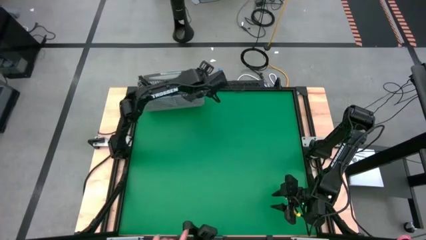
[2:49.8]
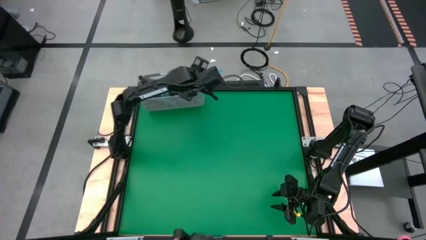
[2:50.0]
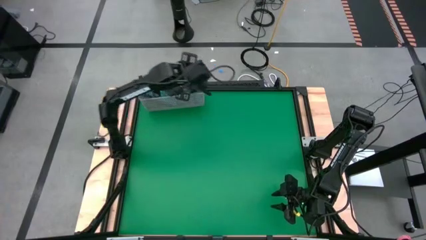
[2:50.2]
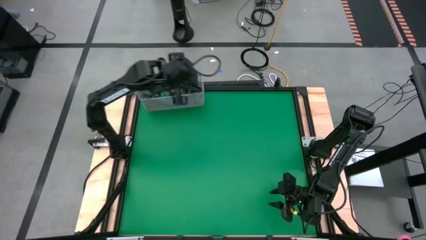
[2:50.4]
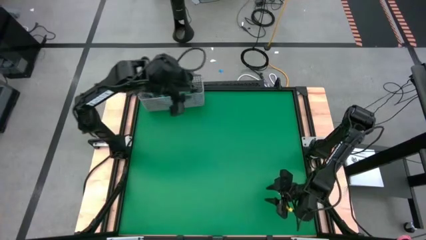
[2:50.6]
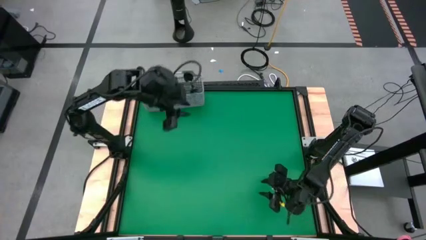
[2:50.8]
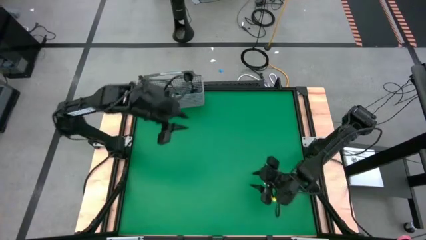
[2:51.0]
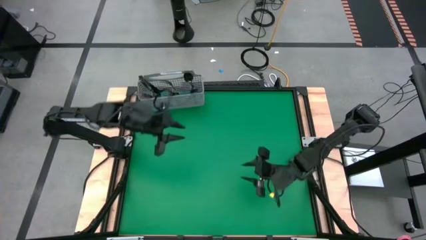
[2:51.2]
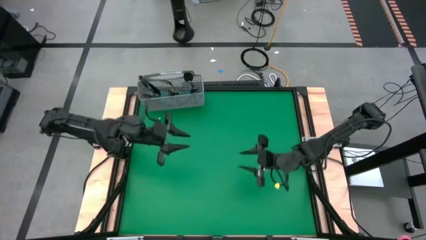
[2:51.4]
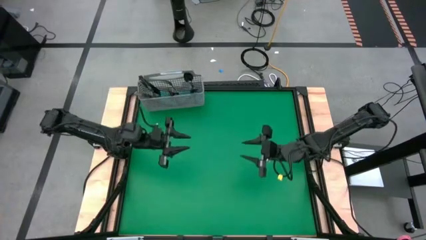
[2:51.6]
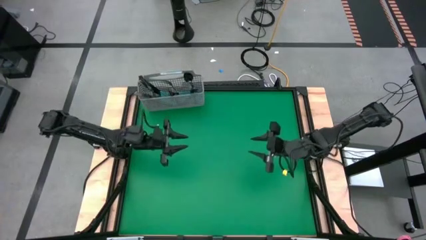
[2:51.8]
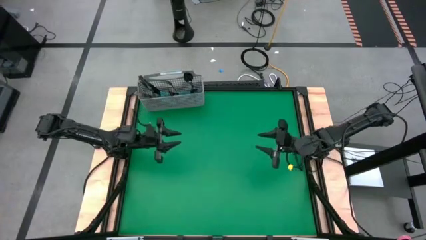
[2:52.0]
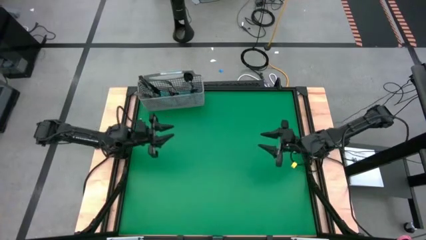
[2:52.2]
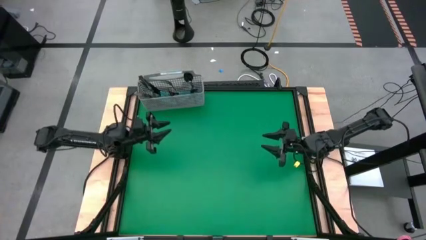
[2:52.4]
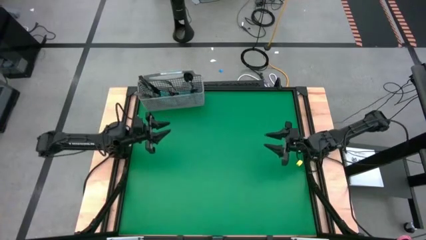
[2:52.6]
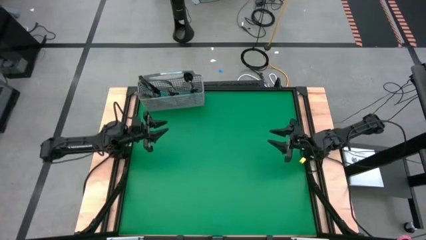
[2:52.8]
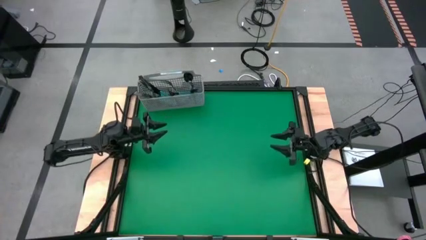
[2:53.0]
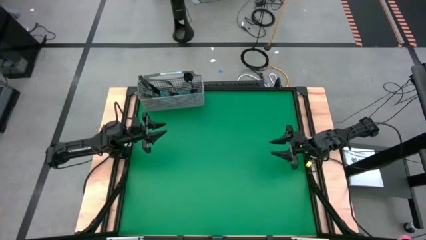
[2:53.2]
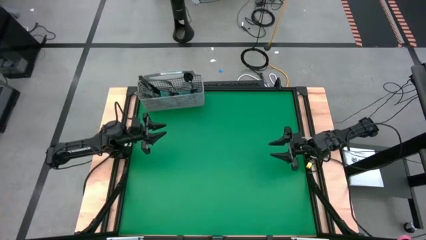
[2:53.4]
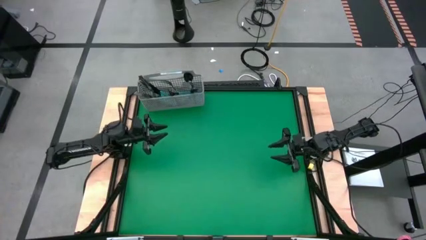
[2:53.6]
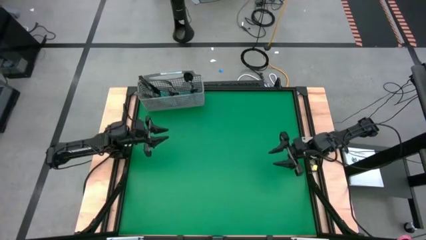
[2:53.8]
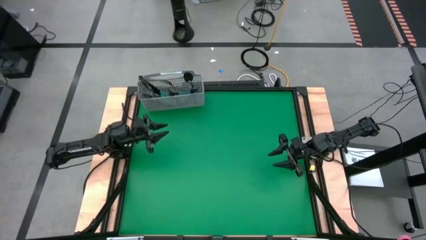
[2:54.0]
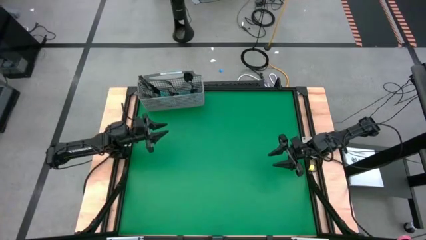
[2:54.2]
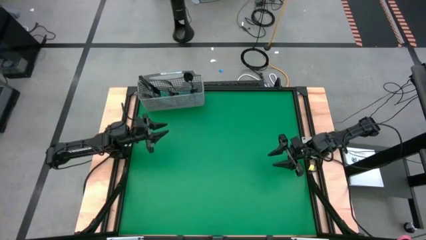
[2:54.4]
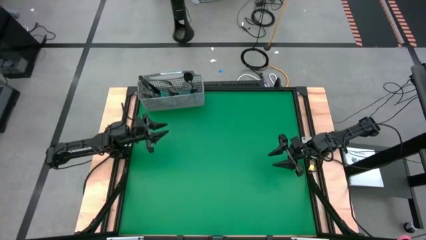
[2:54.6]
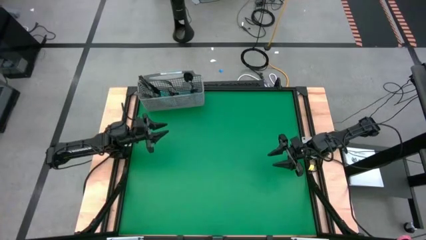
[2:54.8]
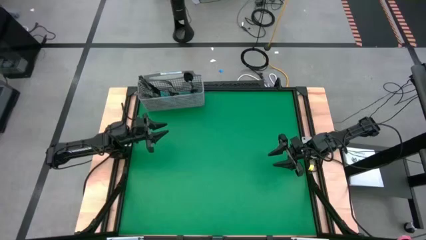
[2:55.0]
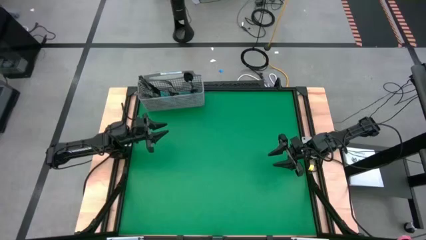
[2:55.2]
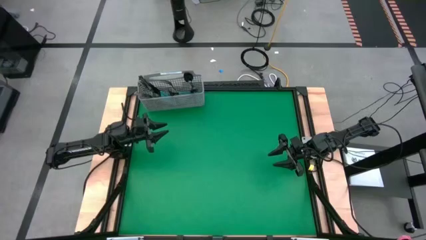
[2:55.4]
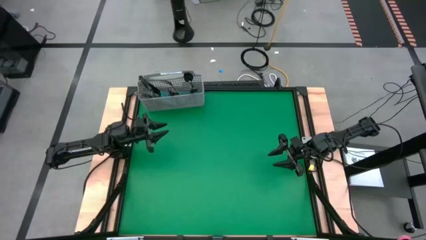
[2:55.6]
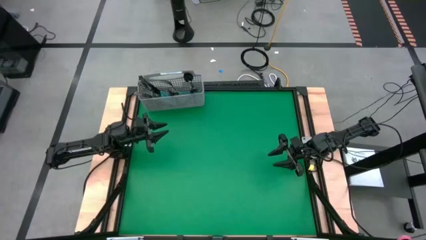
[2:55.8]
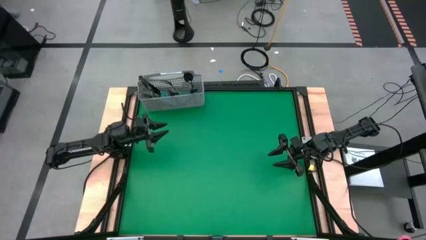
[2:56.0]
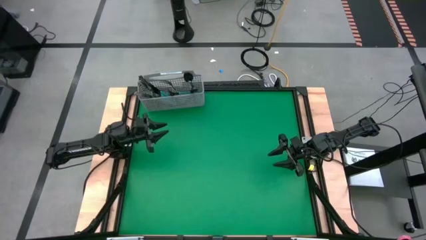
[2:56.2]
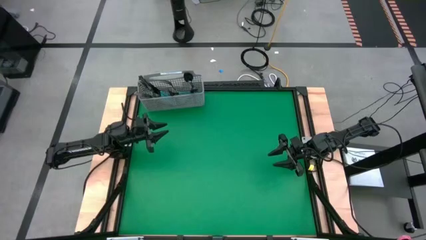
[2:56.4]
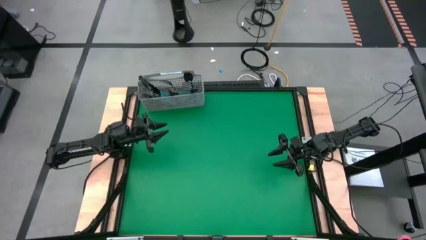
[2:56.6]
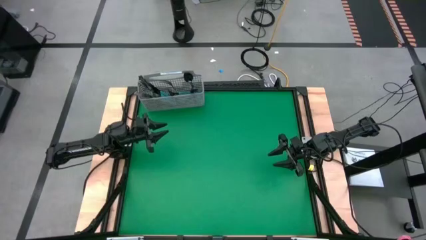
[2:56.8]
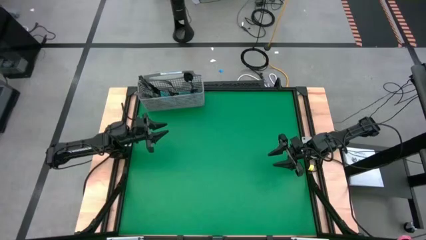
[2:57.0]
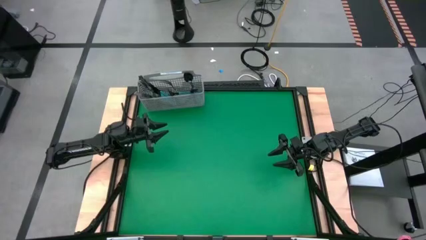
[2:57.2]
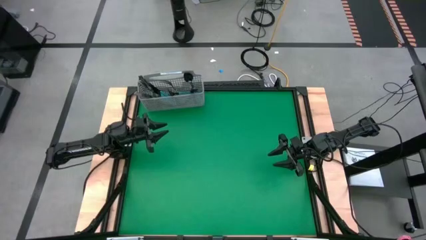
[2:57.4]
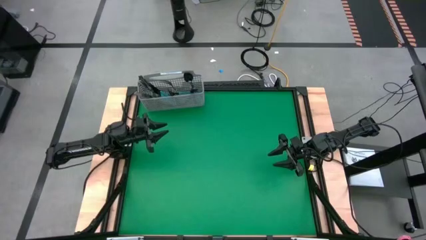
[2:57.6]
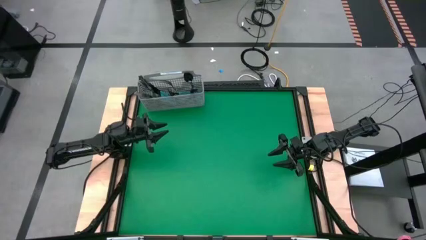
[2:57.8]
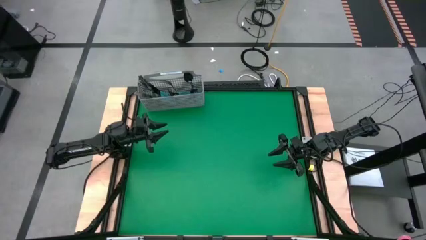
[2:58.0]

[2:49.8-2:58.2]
Task: Sort silverware
Return to Home Position

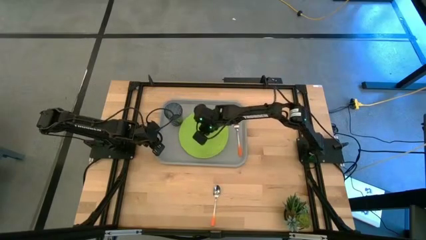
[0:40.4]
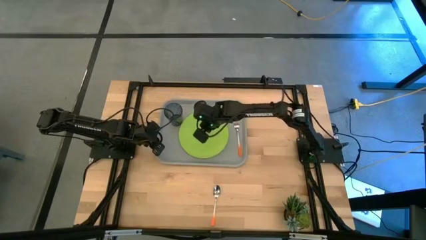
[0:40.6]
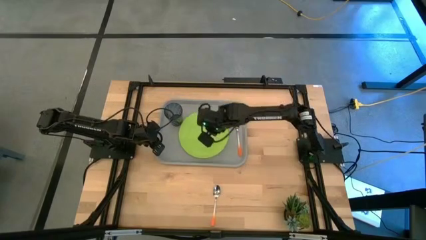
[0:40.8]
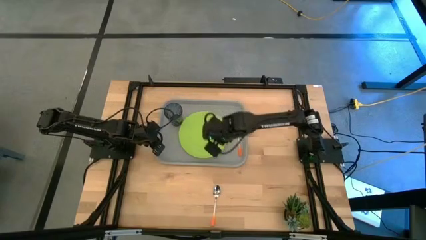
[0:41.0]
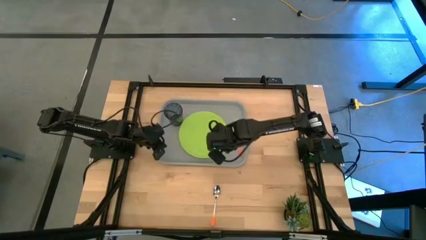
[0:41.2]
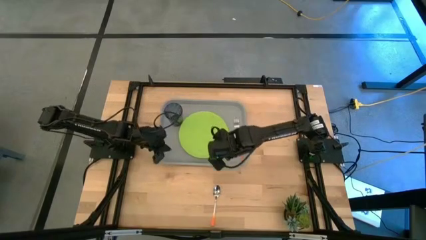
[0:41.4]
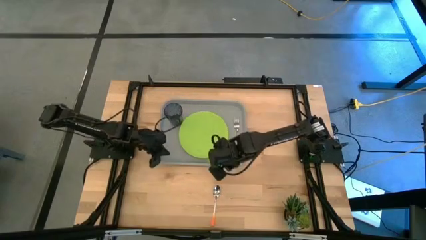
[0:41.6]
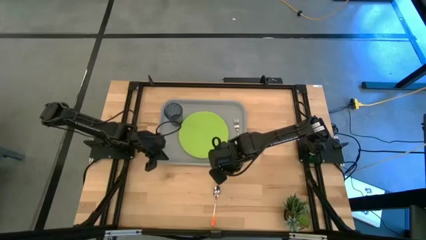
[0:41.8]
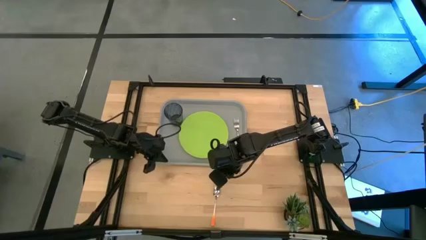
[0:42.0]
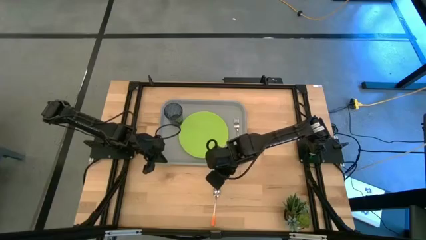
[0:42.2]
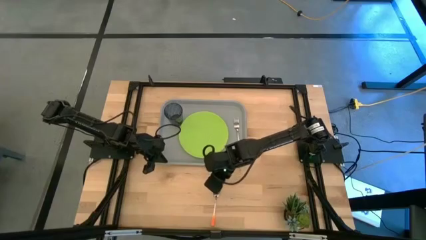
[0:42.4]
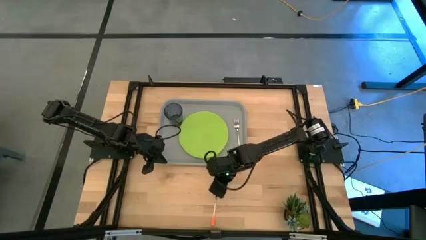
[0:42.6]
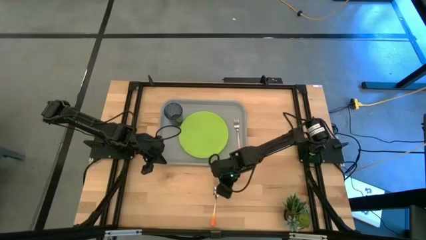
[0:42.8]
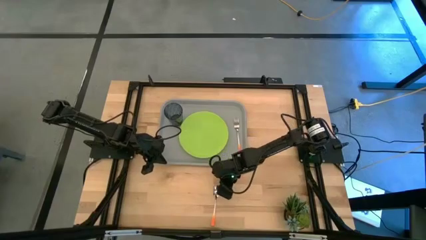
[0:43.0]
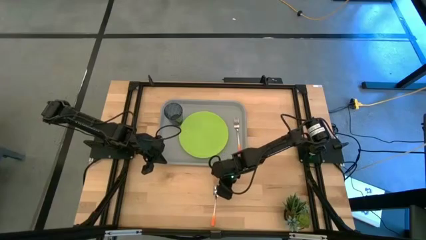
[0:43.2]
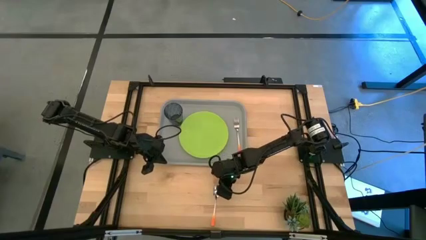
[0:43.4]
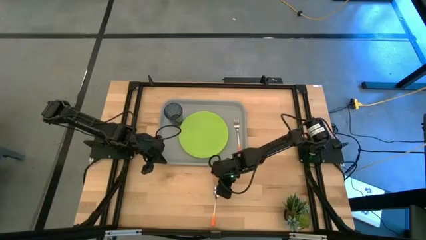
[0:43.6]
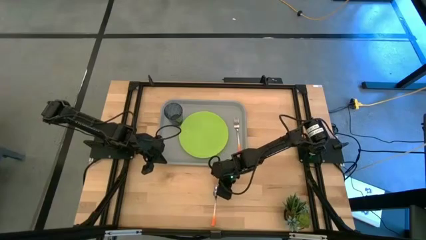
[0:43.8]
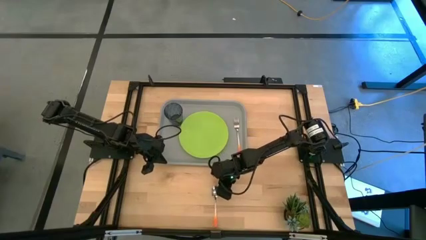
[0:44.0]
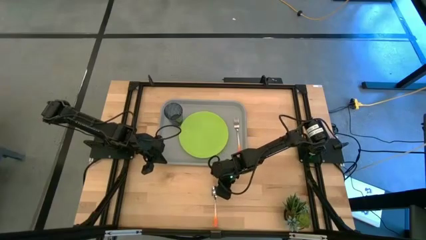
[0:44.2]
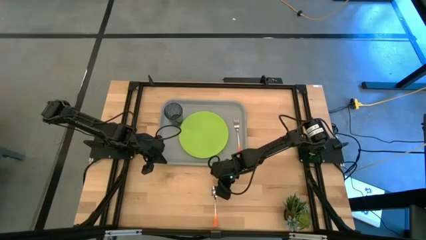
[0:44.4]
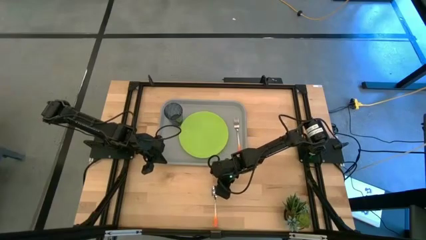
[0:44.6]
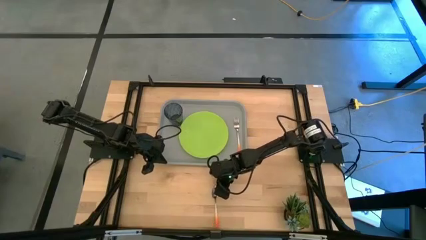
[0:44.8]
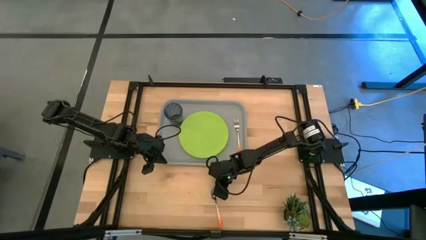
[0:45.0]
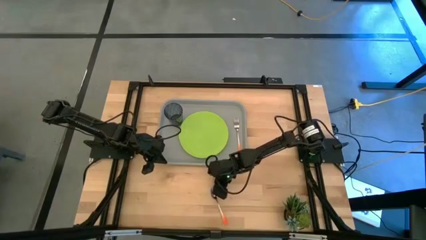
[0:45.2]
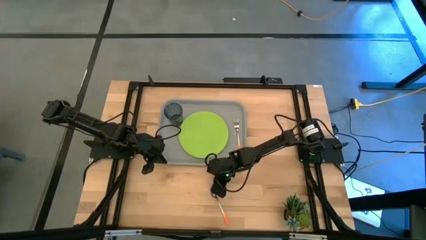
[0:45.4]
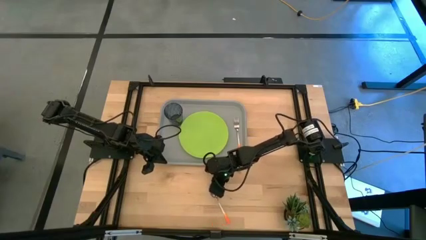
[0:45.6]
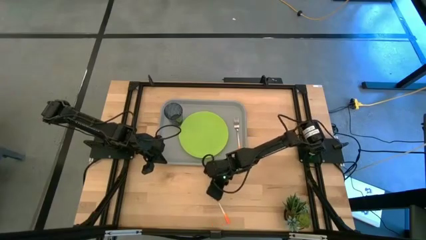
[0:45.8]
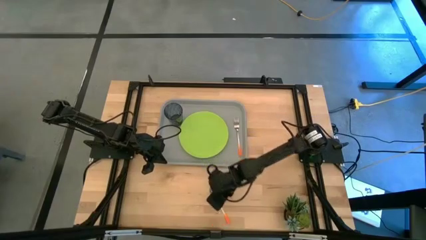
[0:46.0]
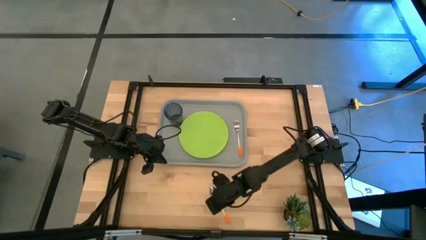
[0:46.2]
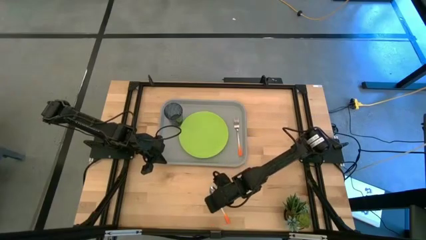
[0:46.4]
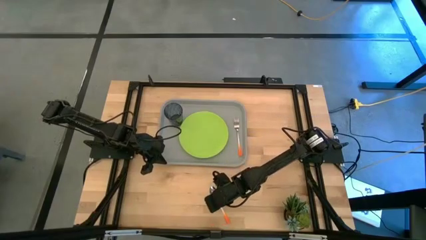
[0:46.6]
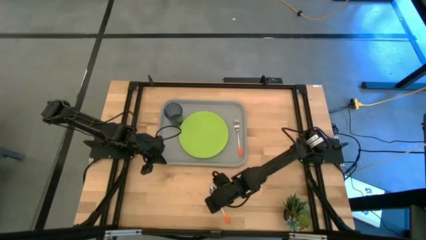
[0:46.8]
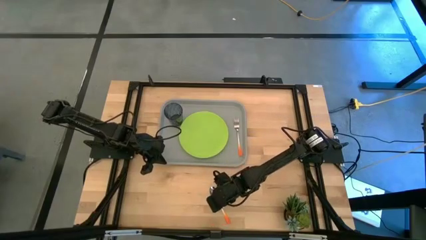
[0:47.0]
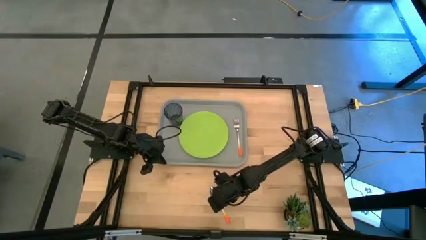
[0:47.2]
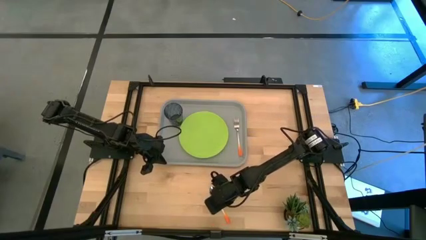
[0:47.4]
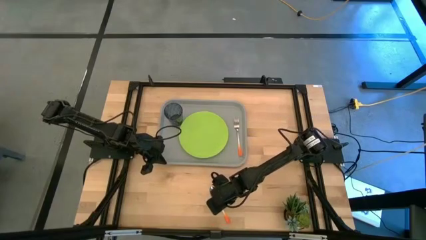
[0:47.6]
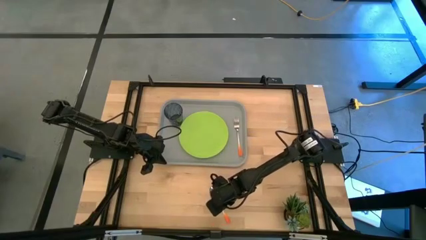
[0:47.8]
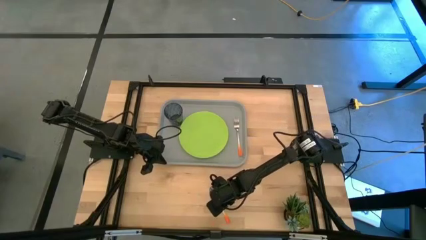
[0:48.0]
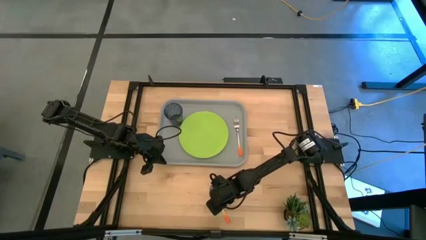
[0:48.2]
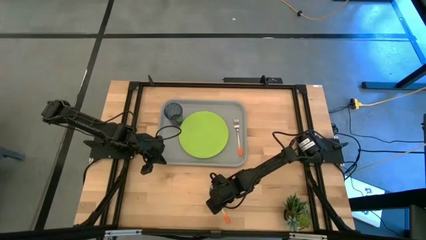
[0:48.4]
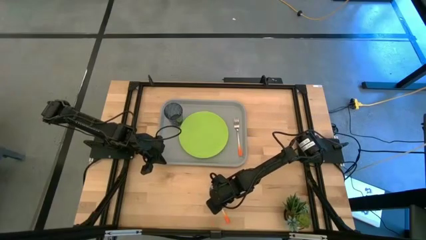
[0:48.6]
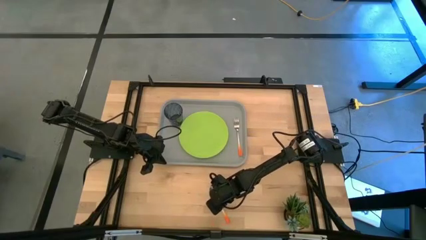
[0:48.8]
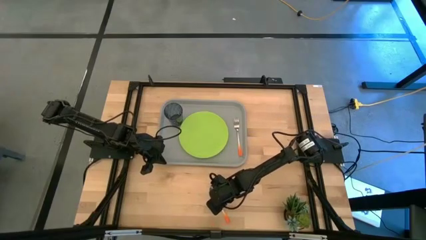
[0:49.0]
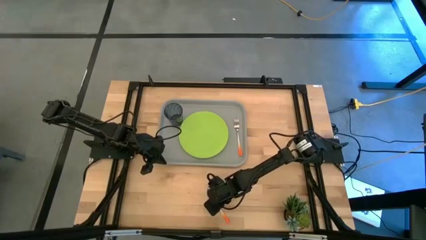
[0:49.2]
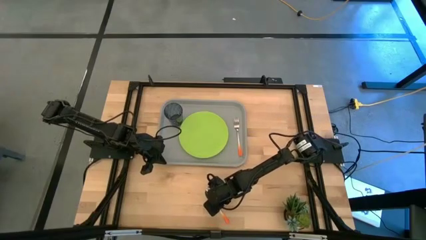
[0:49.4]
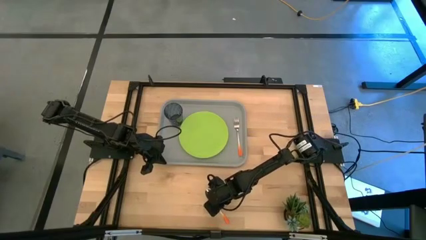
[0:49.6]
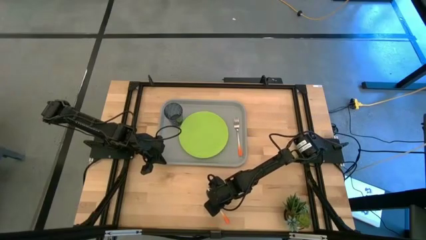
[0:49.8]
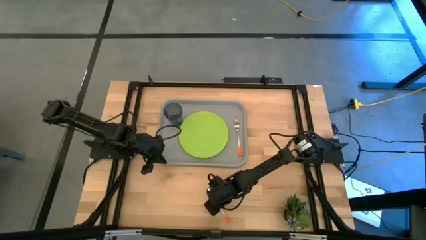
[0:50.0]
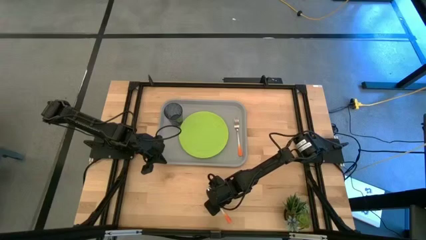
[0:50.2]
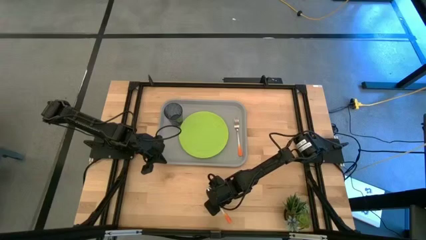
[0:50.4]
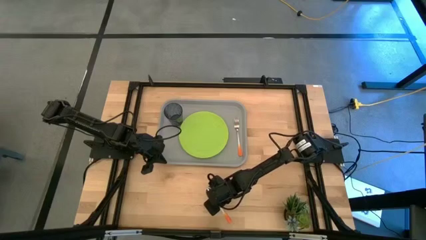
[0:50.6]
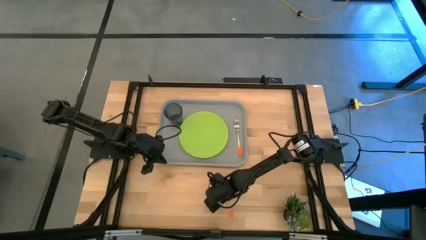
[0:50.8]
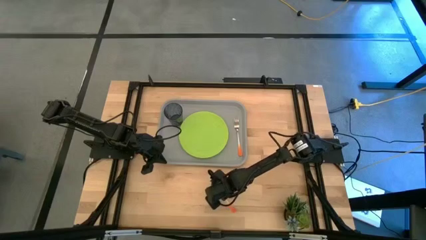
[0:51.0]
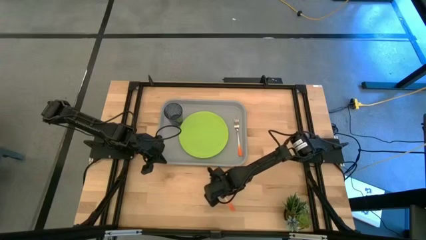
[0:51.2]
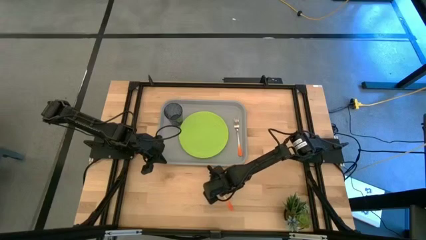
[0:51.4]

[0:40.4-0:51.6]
Task: Pick and place plate/cup/fork/spoon on tray
Put the orange spoon on the gray tray in between the green plate and the orange fork
